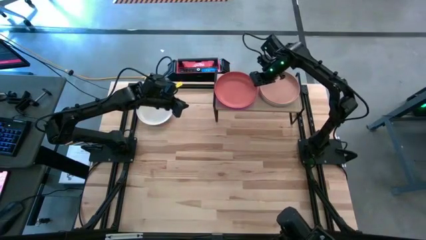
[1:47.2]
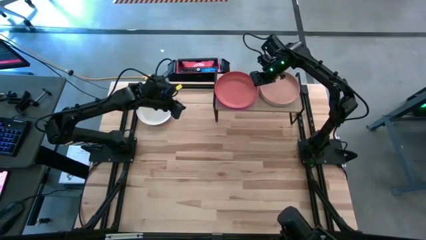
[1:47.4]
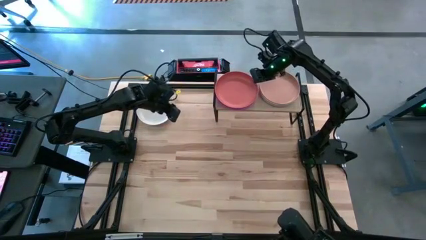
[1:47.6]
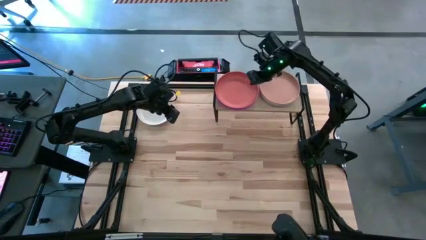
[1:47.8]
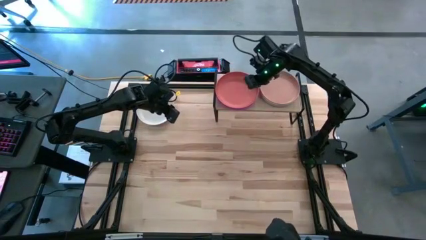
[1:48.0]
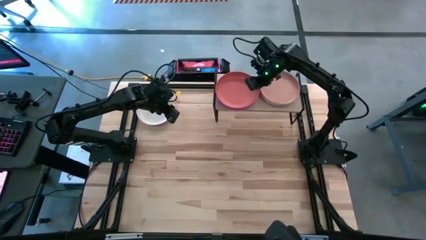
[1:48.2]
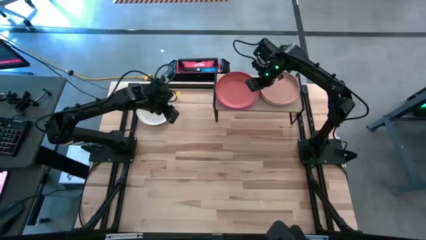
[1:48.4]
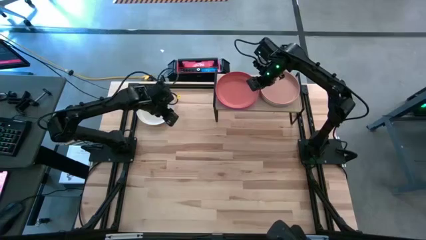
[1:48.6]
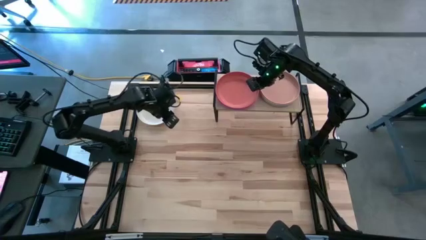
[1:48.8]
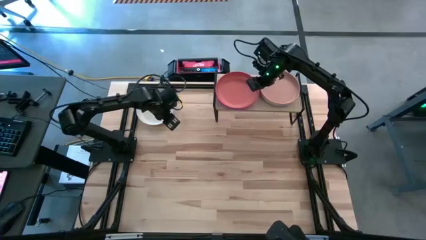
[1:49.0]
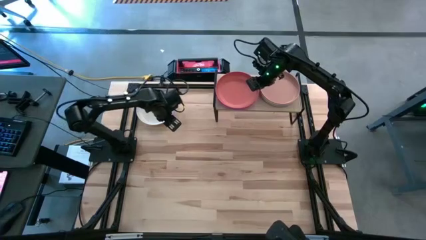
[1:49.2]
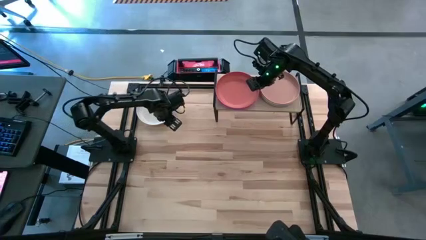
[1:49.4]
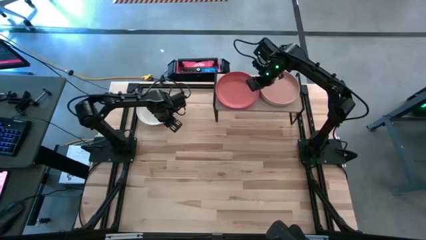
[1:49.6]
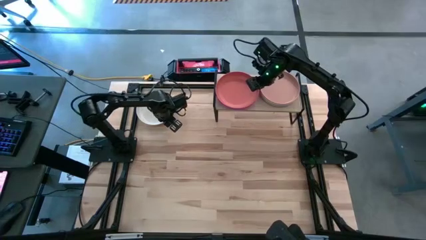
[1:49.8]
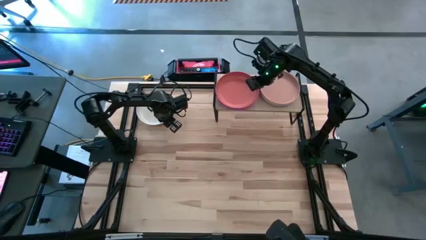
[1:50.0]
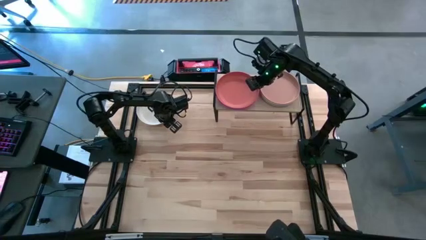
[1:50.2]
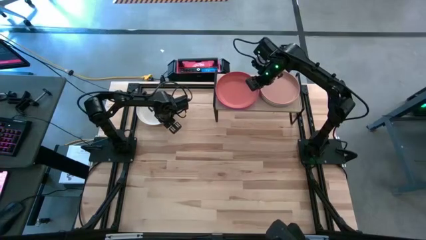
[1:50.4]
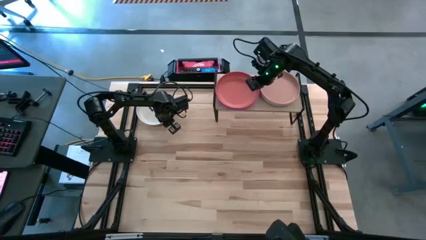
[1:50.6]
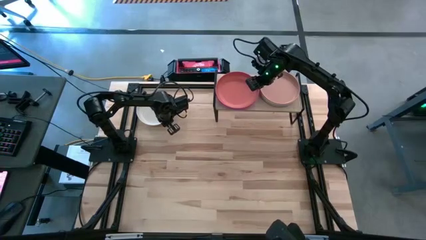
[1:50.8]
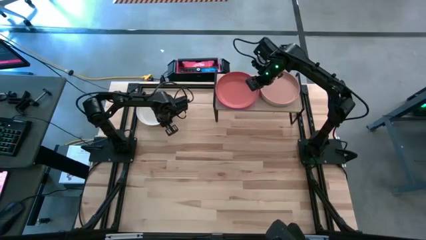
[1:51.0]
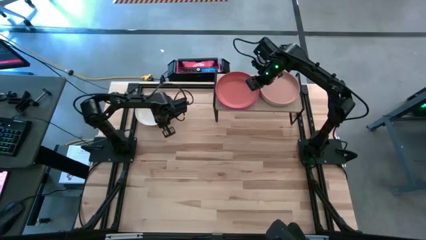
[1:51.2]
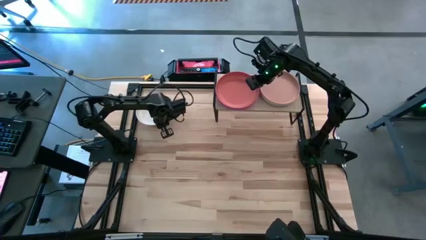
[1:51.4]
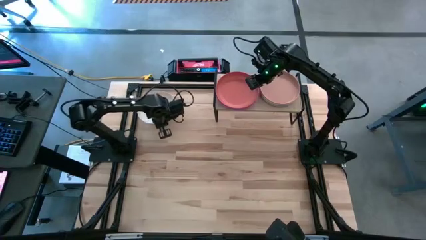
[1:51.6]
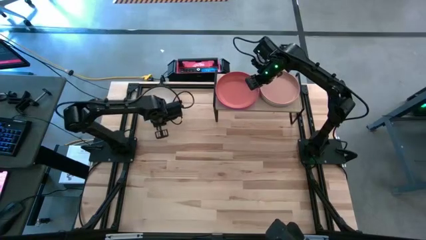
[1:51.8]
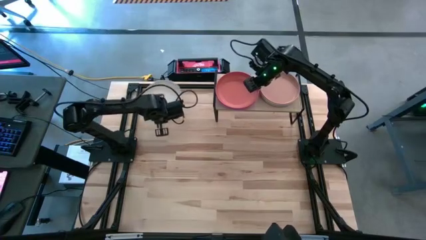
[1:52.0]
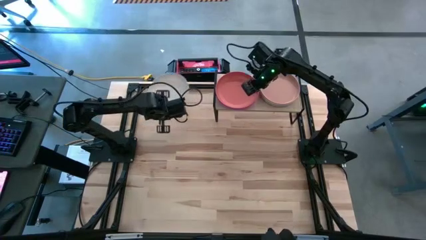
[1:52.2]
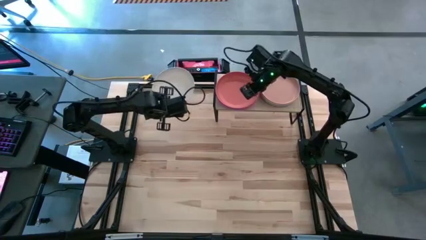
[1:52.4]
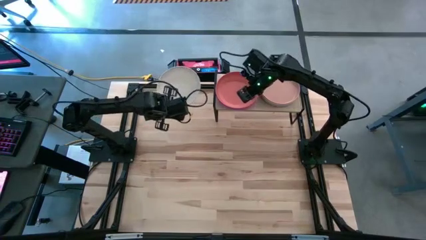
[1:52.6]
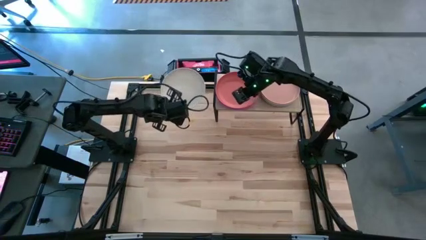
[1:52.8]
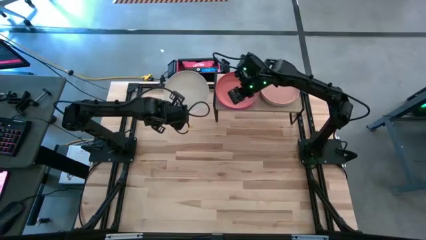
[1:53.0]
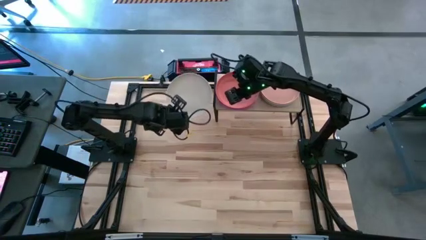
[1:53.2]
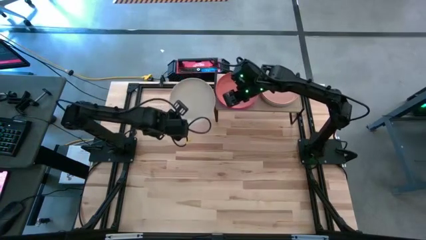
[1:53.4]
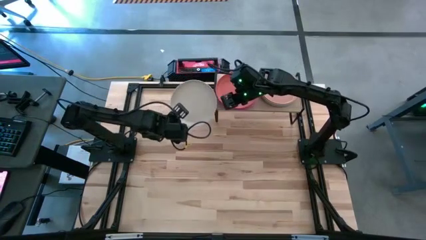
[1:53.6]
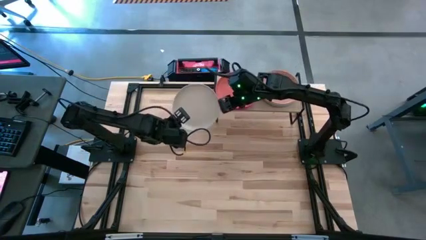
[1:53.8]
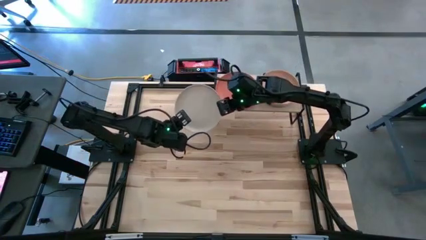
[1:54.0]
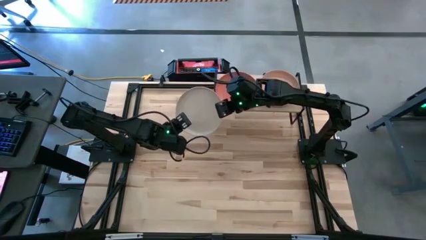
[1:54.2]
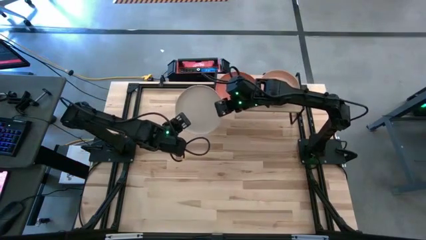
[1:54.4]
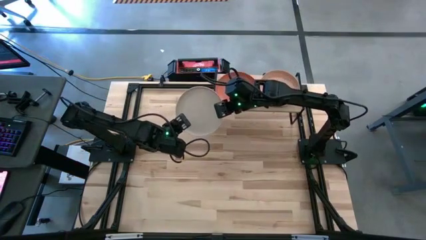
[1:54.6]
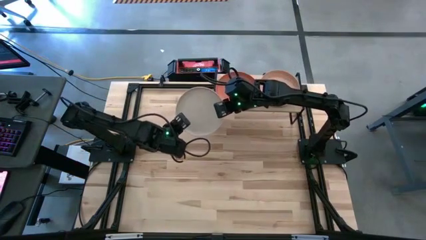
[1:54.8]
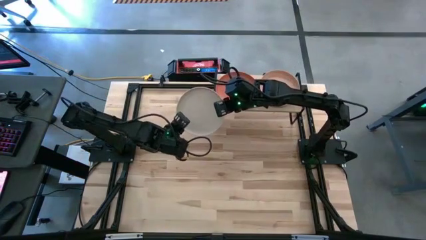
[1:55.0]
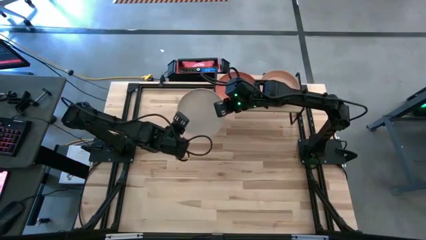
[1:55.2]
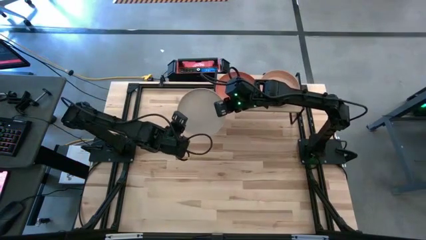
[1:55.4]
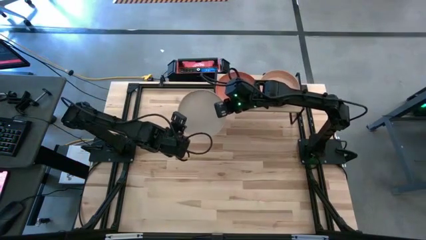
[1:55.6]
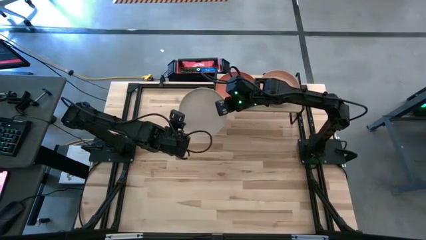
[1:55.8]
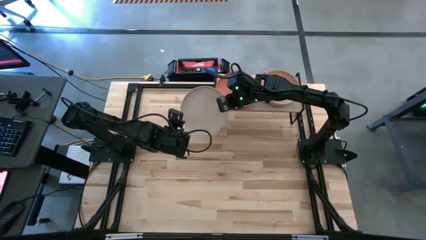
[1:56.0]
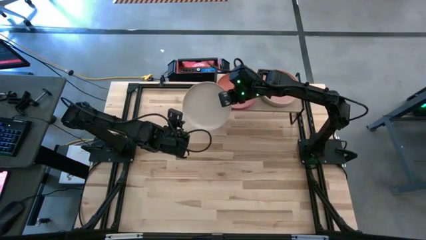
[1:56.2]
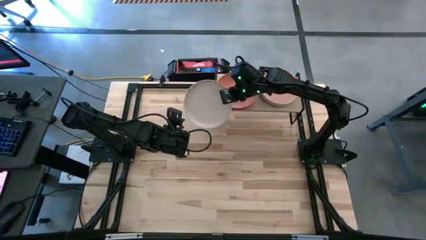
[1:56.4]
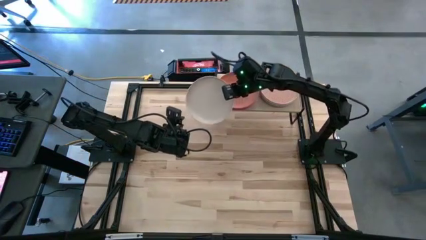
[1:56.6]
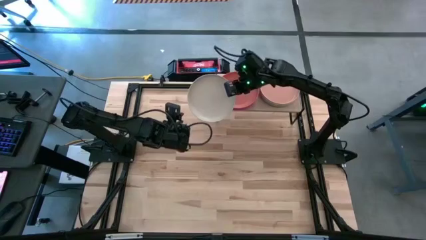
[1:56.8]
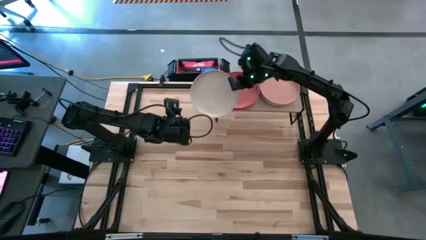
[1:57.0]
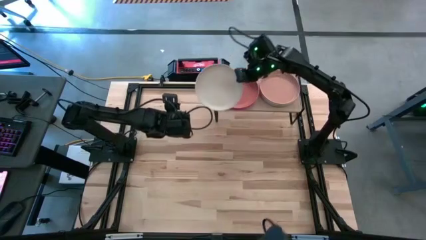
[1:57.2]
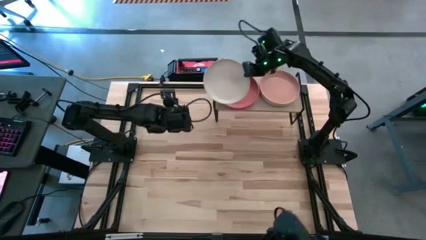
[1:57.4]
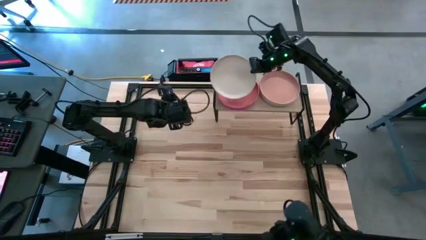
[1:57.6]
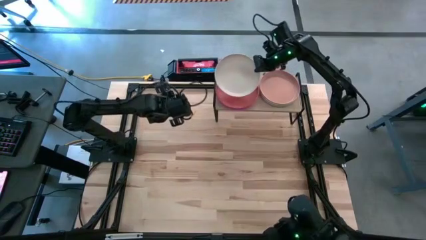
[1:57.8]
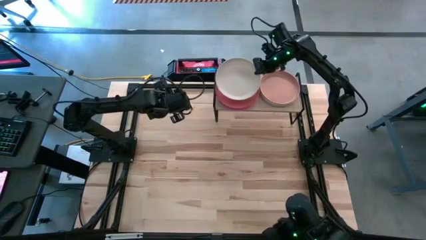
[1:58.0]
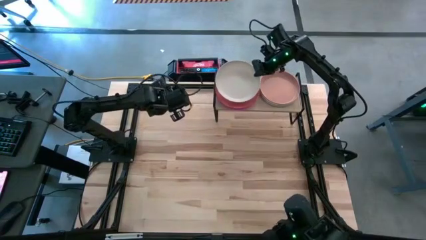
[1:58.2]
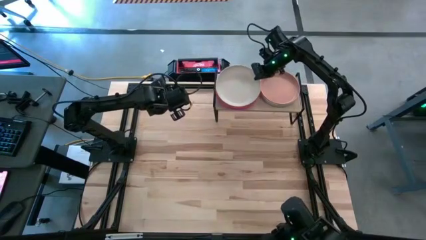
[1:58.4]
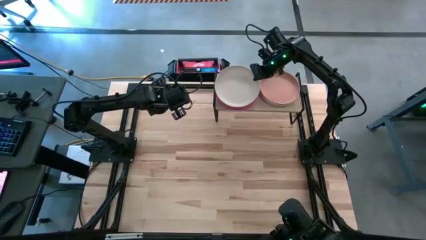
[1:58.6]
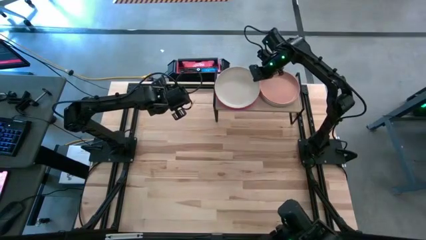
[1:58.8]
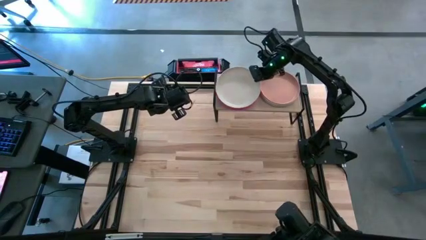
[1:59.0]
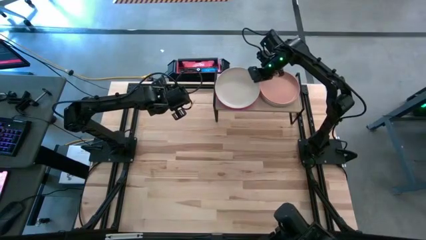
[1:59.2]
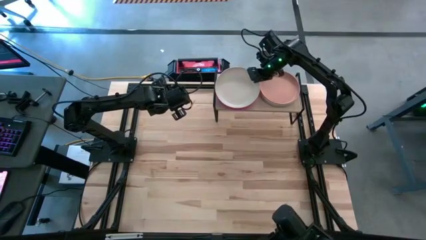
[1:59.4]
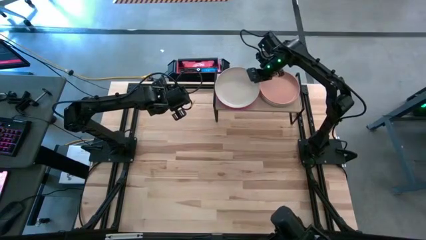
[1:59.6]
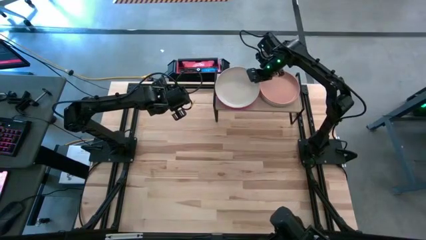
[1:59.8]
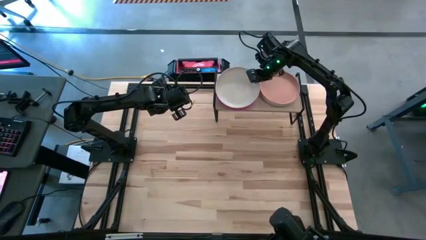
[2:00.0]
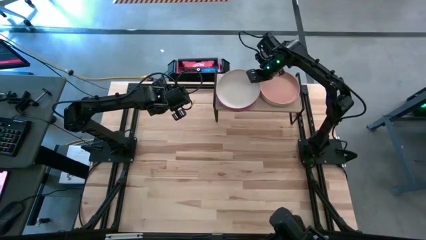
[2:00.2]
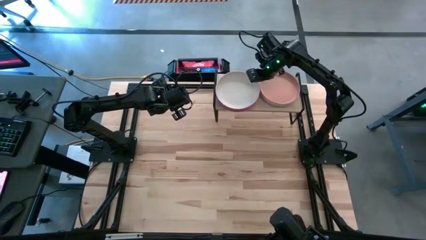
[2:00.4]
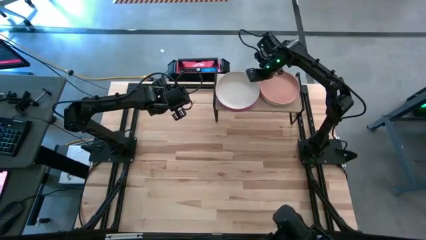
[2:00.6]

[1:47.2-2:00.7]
Task: Place and stack plates onto a shelf
Stack the white plate on top of the orange stacked plates on the shelf
